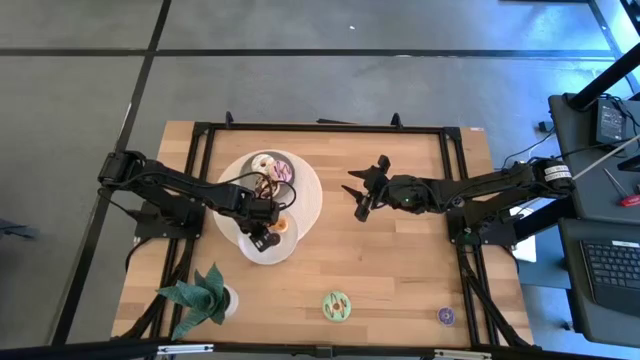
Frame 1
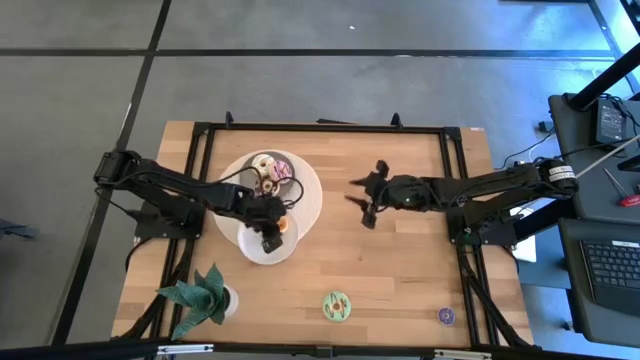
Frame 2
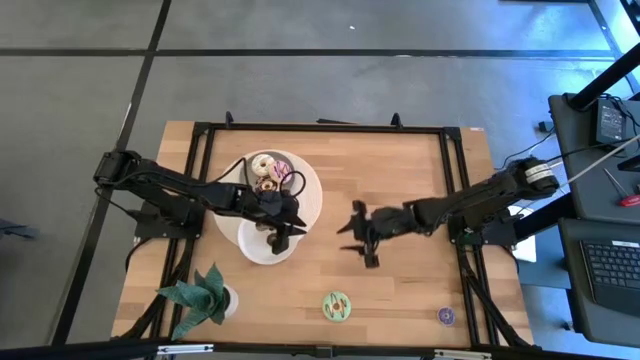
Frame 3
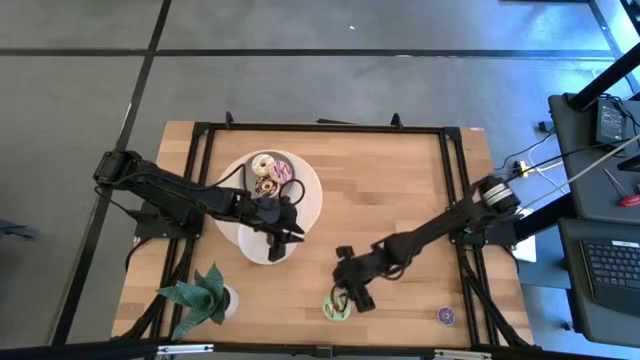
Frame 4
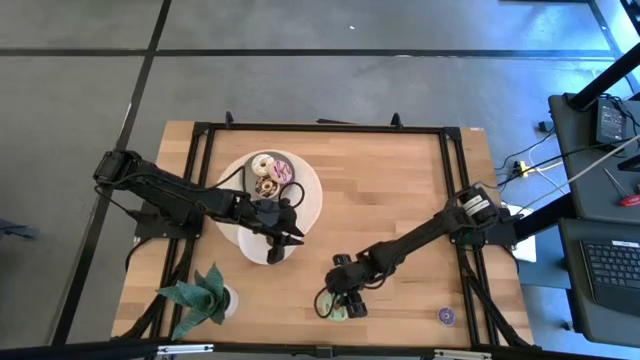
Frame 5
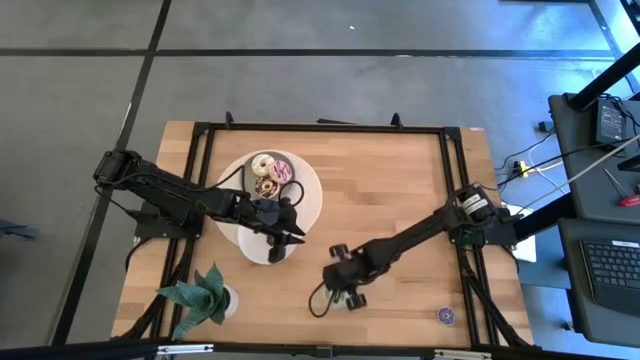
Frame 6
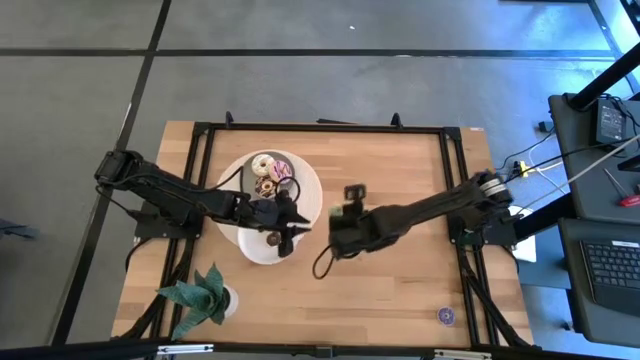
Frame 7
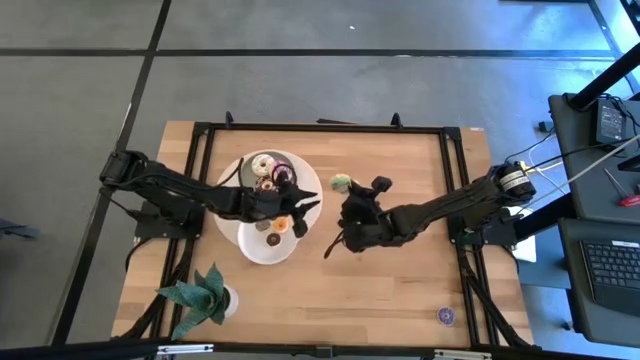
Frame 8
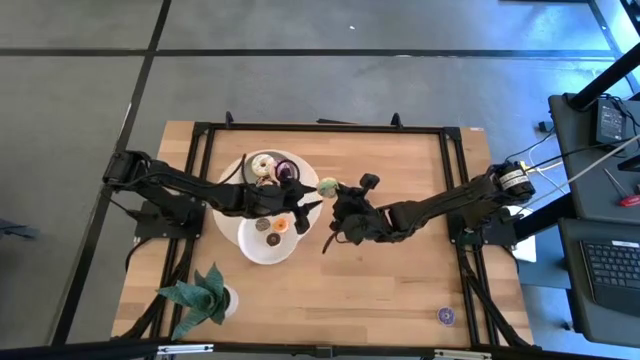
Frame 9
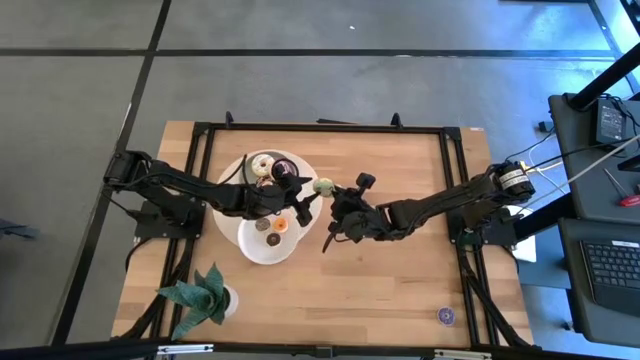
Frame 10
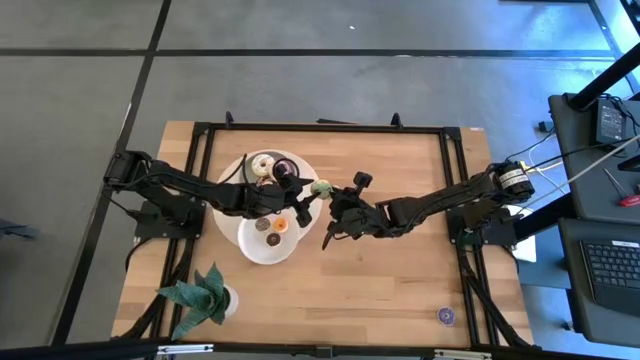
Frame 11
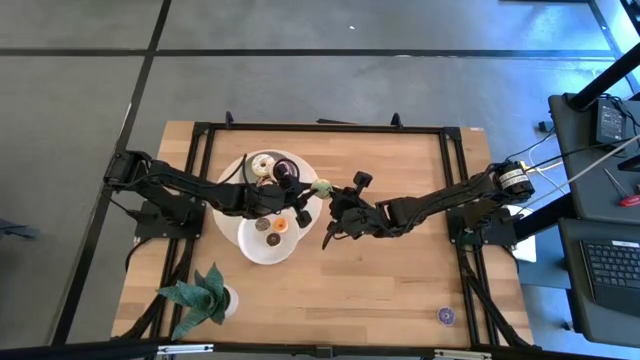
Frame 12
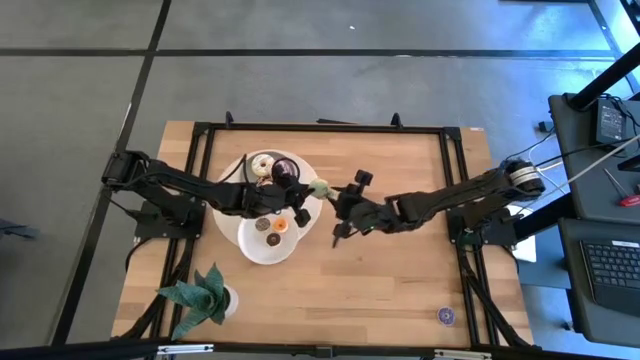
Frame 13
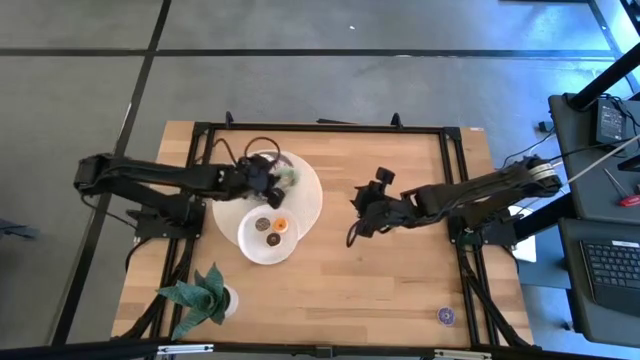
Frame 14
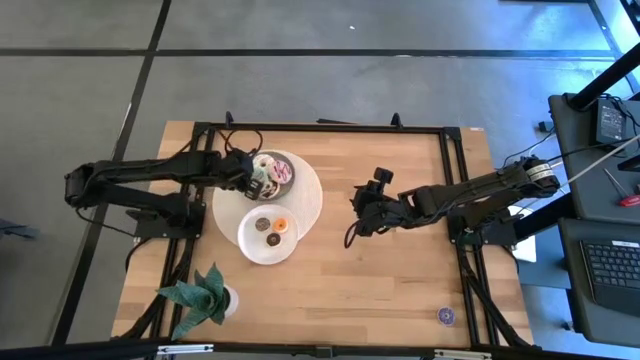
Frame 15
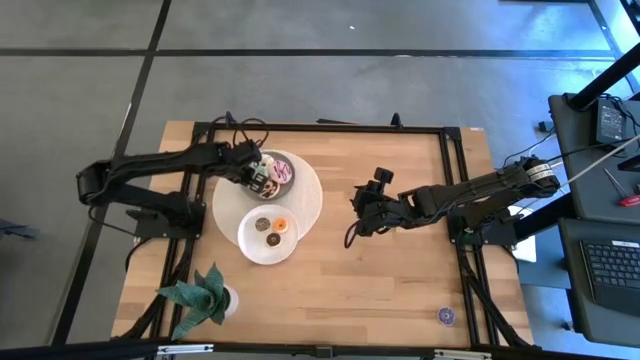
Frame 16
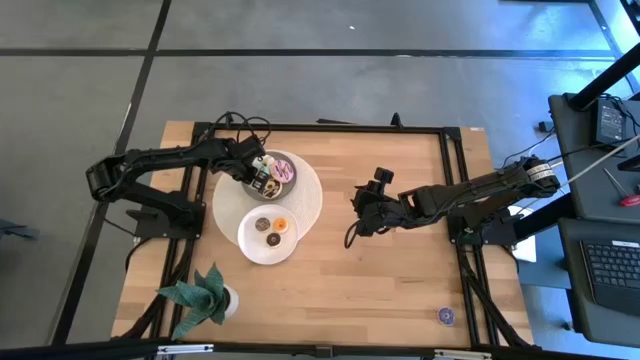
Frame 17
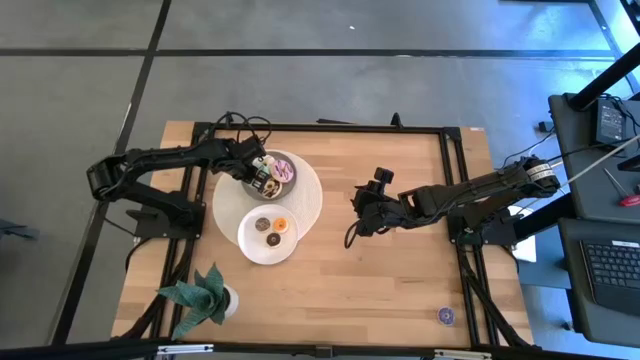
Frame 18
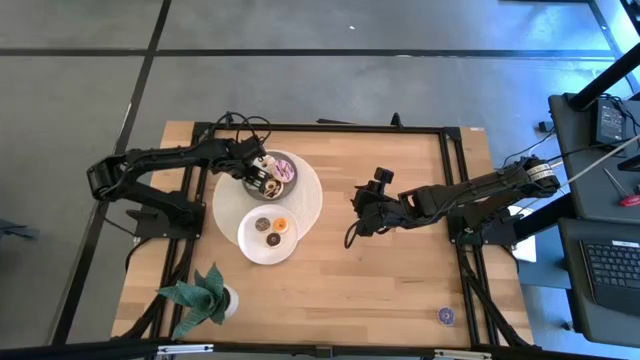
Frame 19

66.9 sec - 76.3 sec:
Task: Pick & Place donuts
Put the big green donut on the gray plate

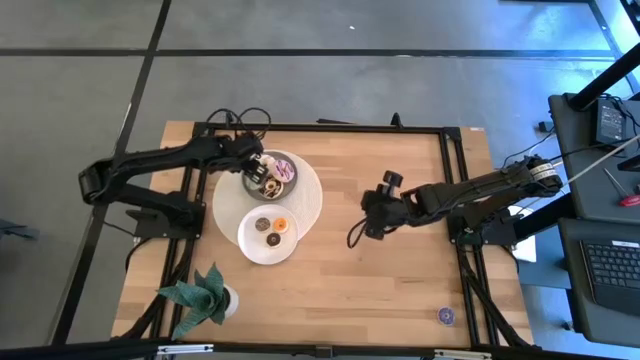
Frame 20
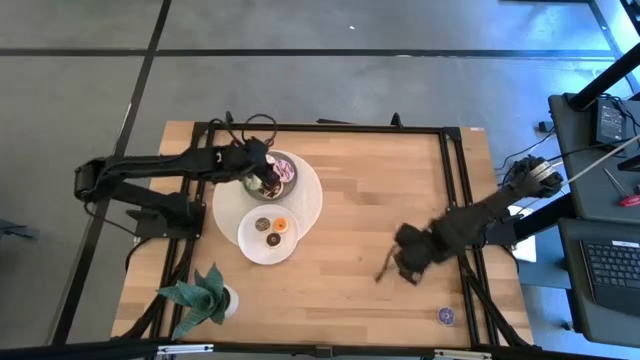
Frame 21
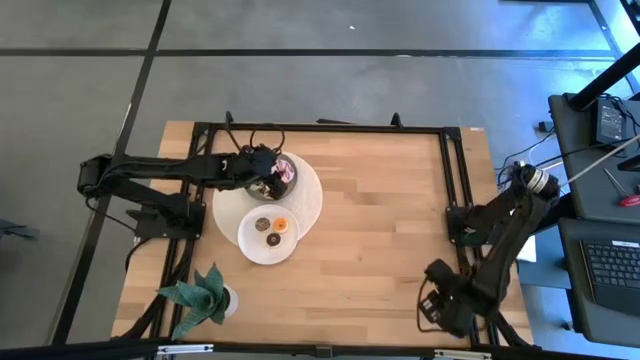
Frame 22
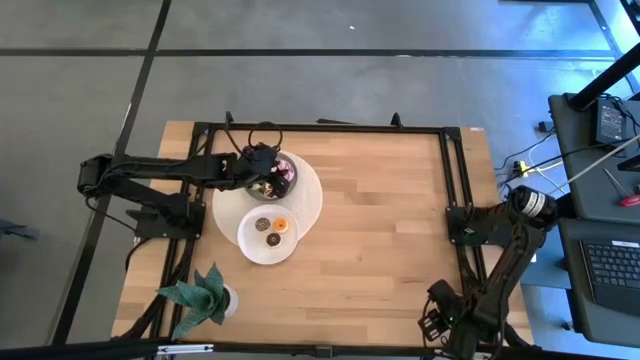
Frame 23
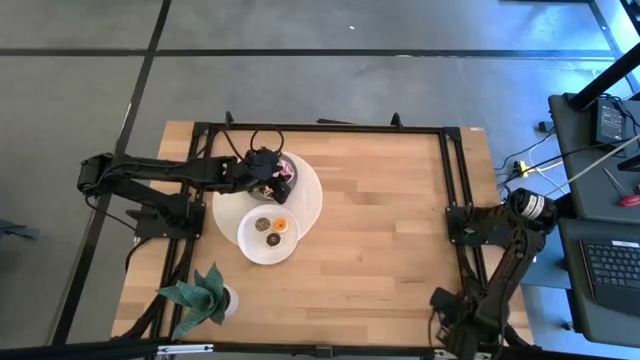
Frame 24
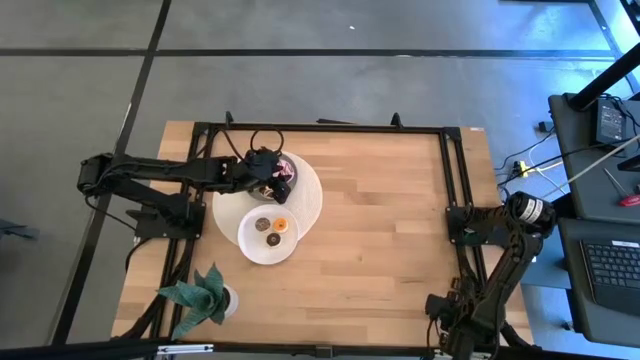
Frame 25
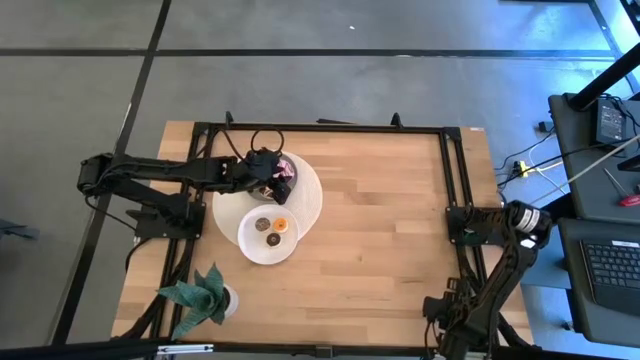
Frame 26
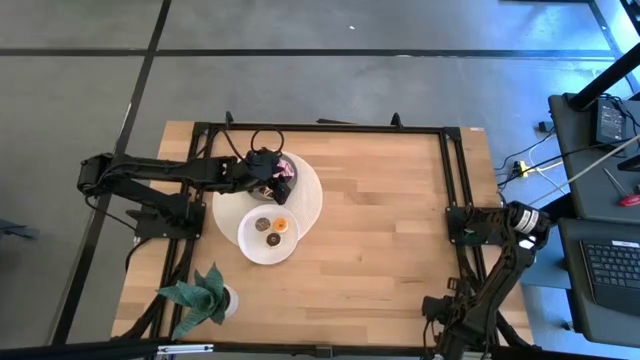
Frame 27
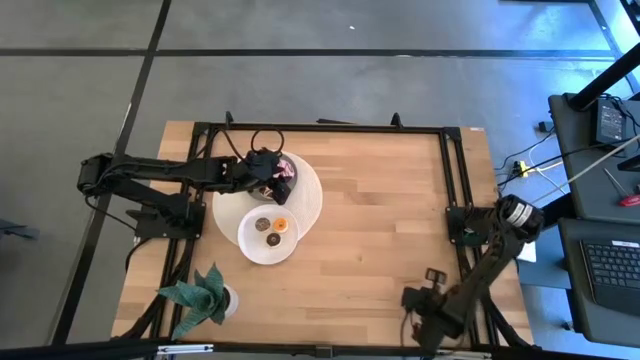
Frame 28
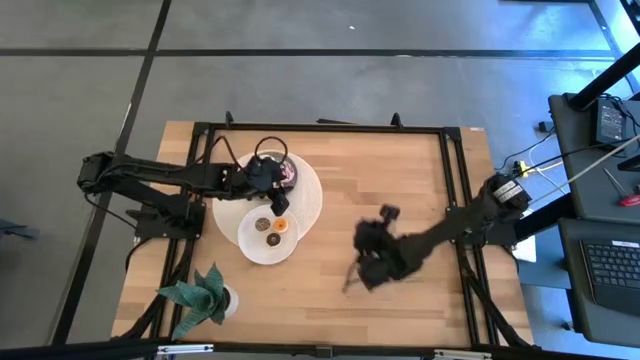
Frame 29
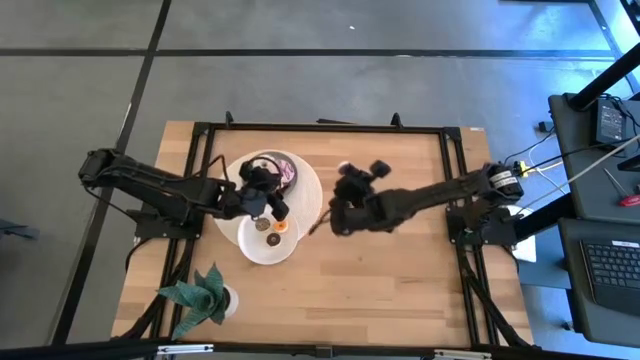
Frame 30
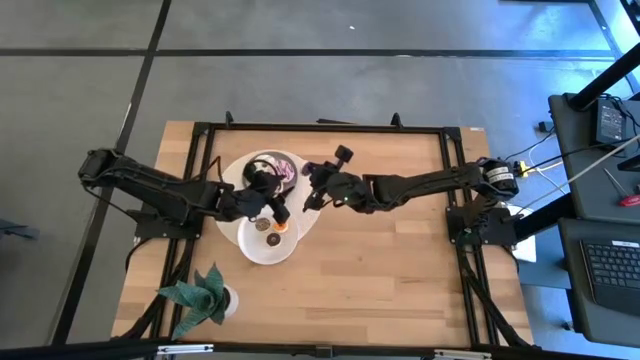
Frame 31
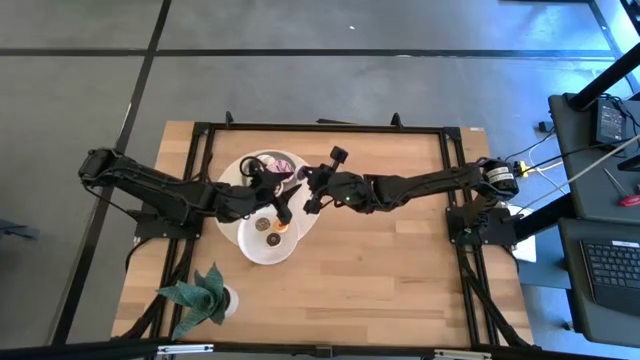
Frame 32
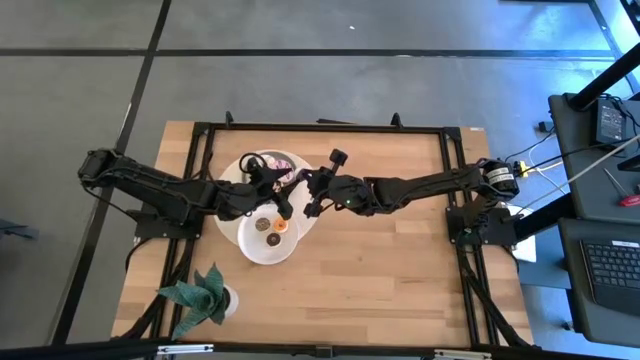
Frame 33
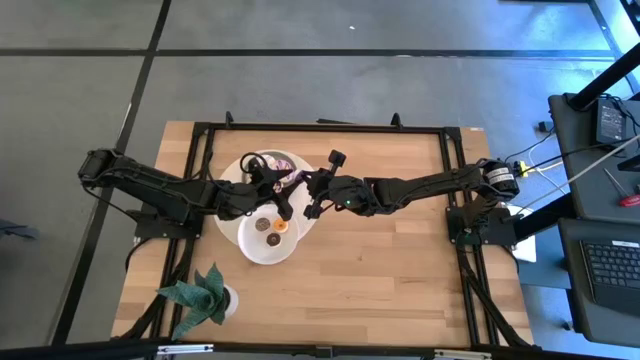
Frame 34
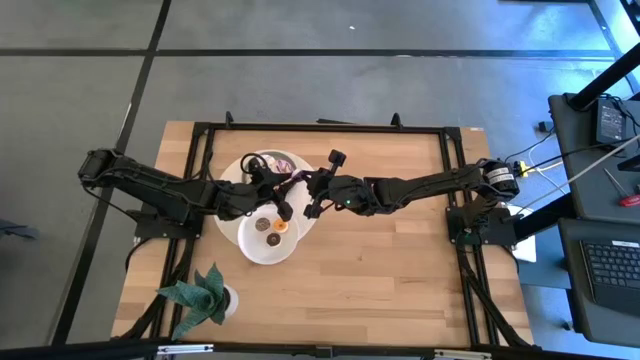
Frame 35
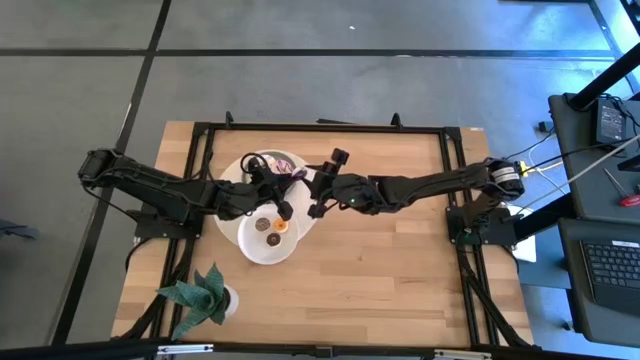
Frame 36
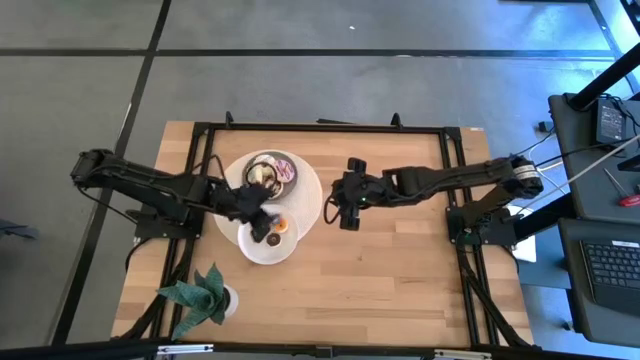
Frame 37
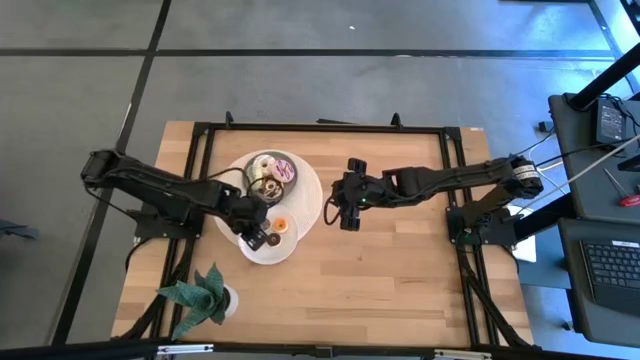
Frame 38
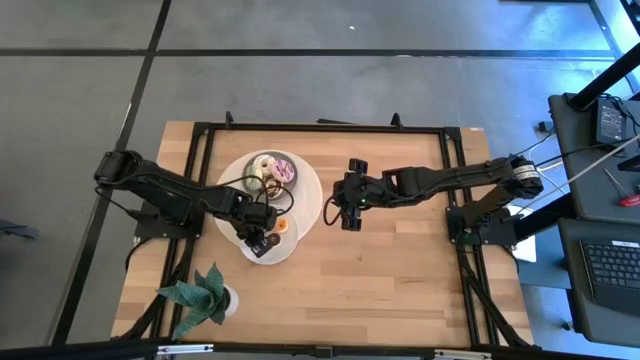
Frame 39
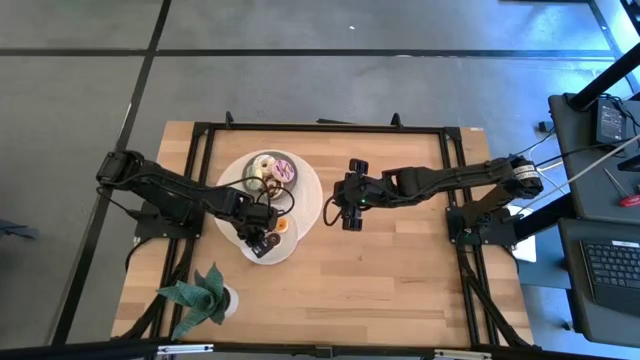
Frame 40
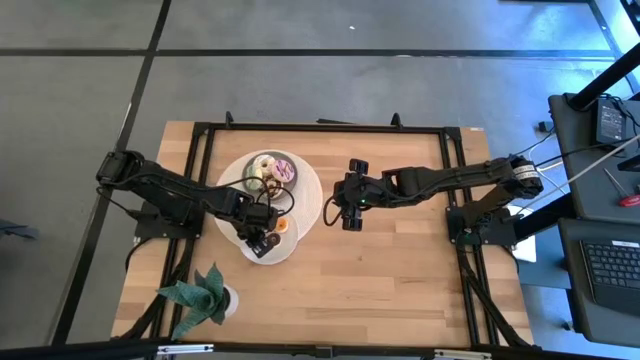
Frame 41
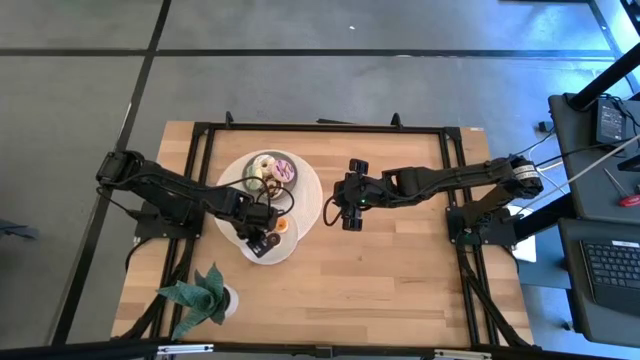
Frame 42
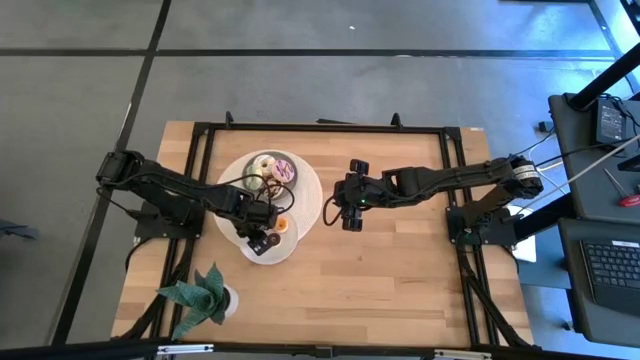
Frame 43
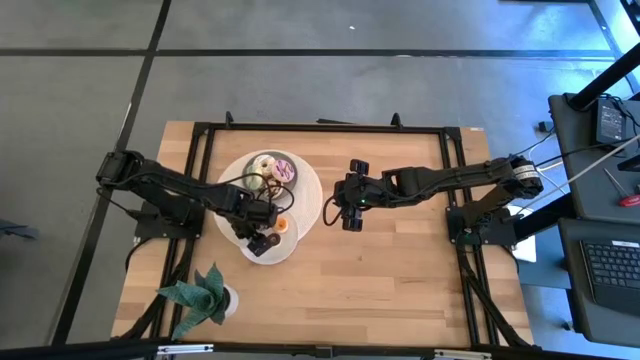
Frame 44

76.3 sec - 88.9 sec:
Put the small blue donut on the white plate
